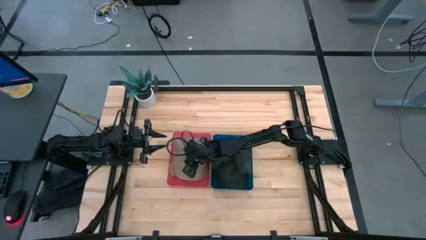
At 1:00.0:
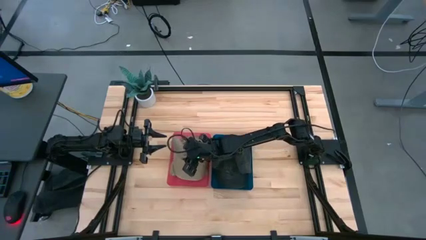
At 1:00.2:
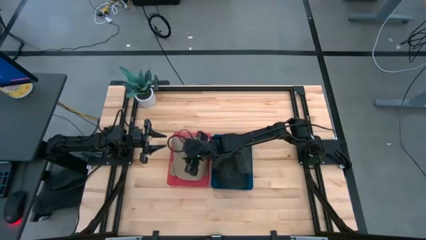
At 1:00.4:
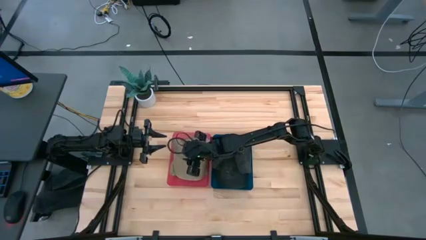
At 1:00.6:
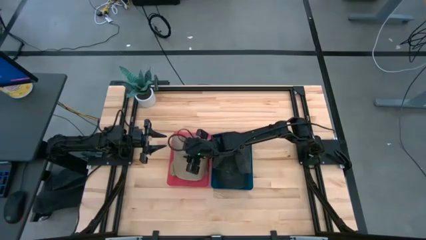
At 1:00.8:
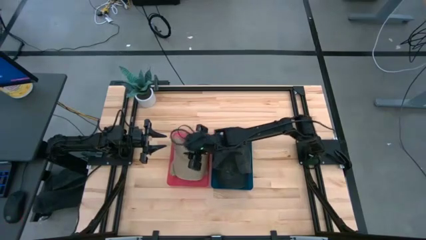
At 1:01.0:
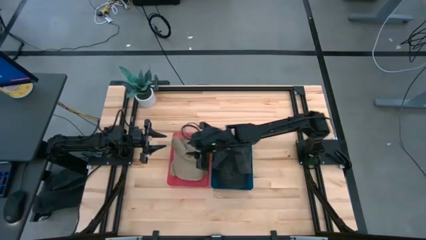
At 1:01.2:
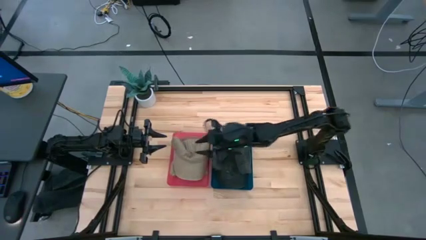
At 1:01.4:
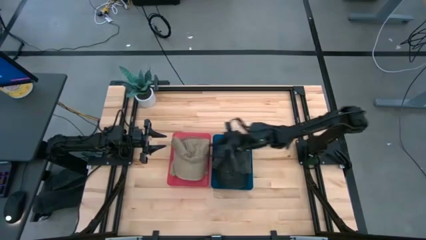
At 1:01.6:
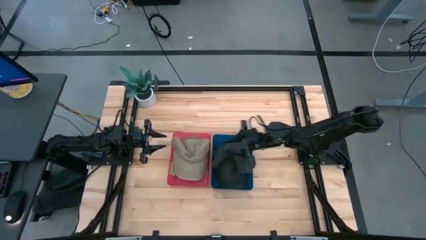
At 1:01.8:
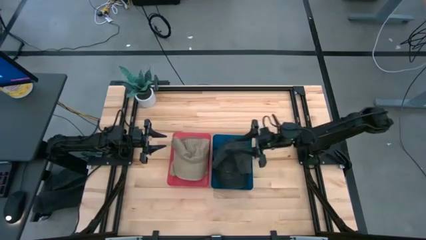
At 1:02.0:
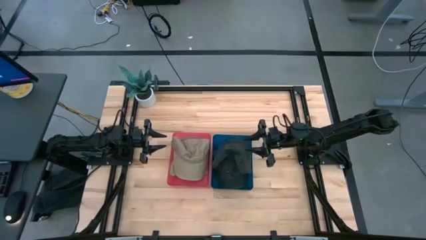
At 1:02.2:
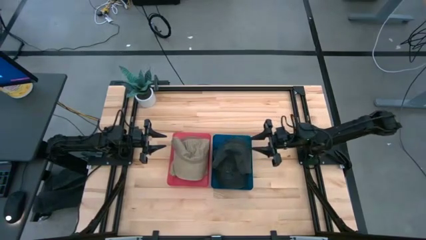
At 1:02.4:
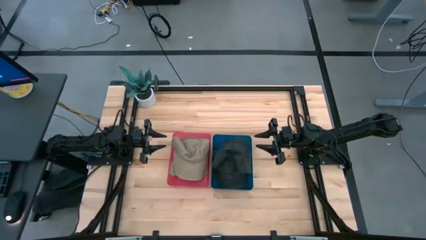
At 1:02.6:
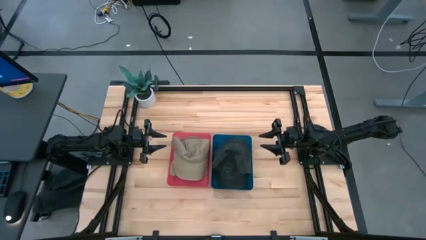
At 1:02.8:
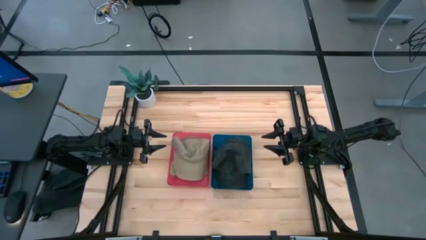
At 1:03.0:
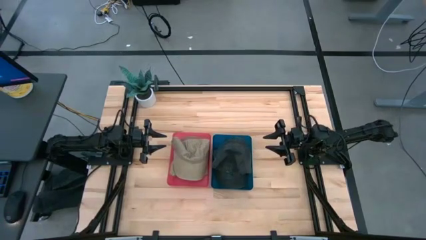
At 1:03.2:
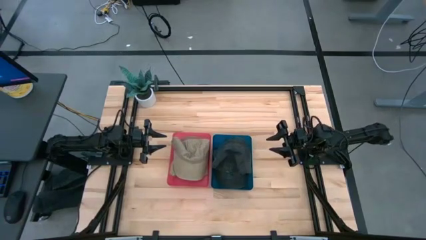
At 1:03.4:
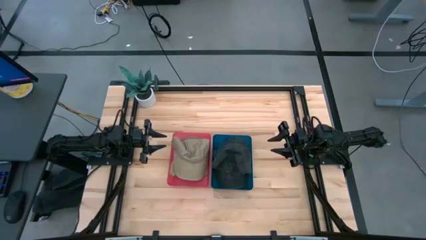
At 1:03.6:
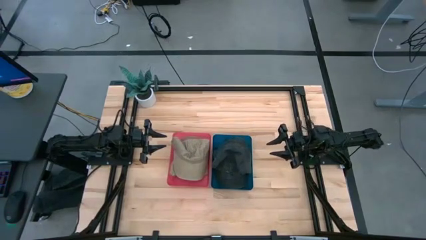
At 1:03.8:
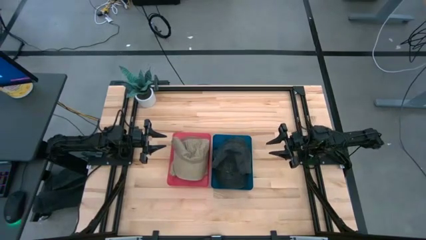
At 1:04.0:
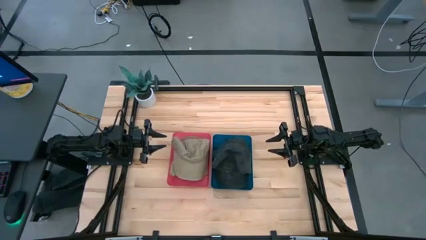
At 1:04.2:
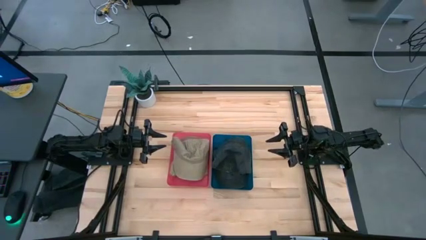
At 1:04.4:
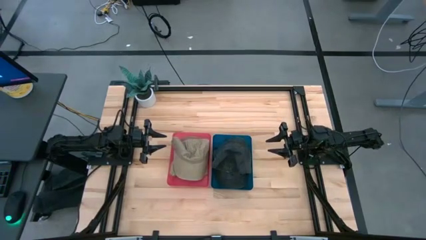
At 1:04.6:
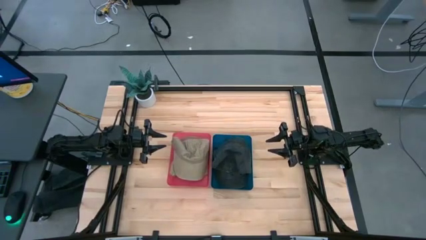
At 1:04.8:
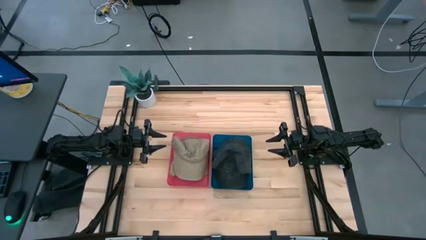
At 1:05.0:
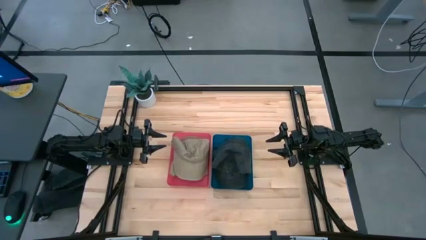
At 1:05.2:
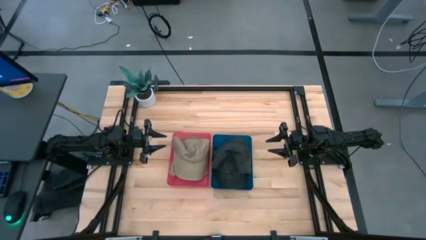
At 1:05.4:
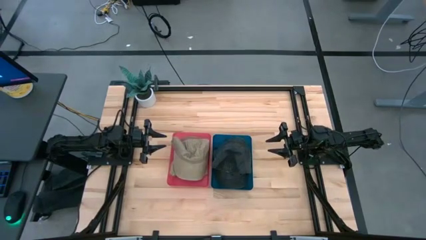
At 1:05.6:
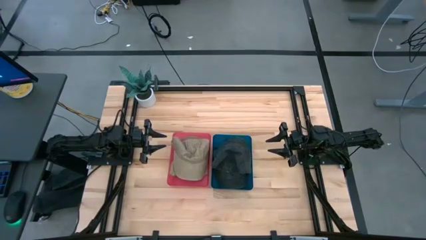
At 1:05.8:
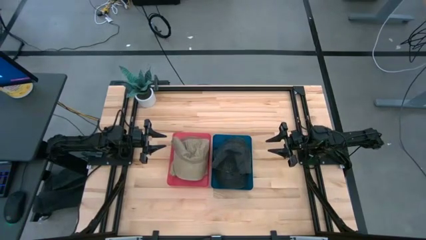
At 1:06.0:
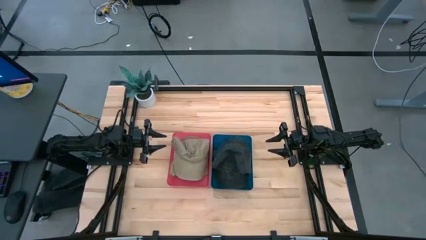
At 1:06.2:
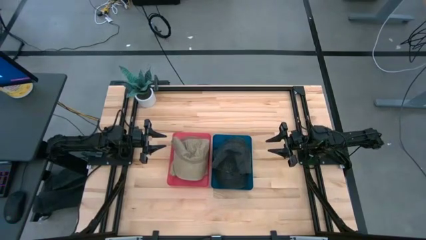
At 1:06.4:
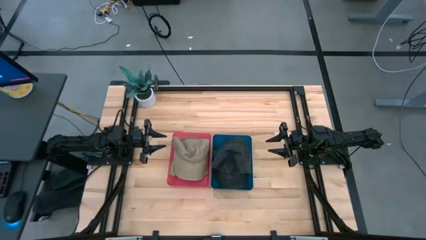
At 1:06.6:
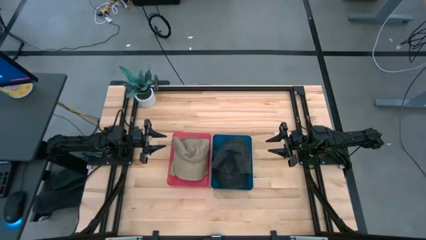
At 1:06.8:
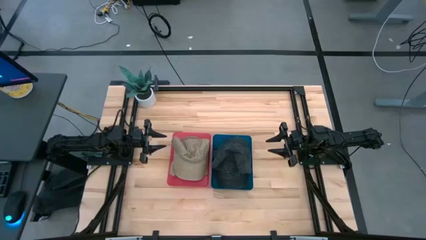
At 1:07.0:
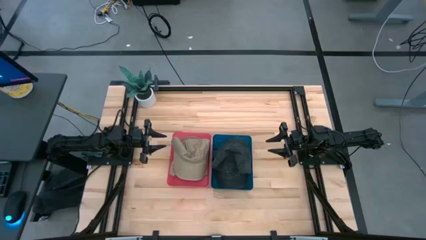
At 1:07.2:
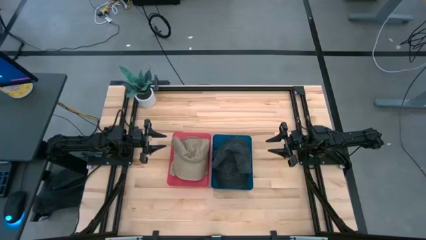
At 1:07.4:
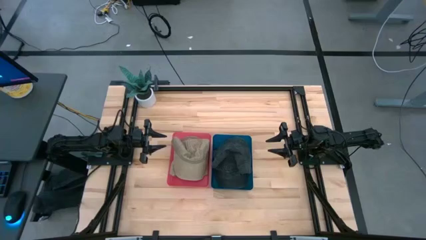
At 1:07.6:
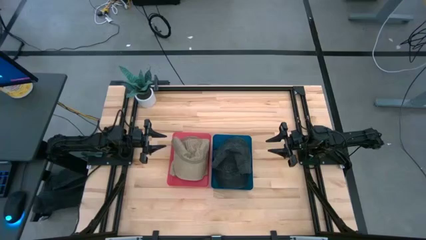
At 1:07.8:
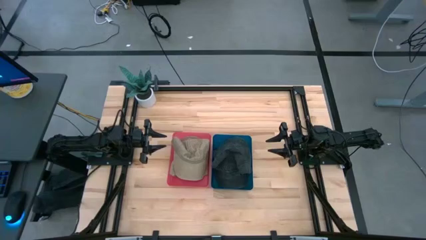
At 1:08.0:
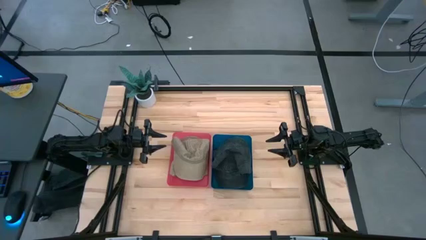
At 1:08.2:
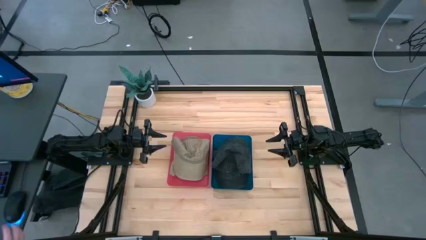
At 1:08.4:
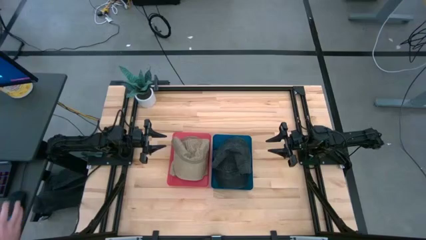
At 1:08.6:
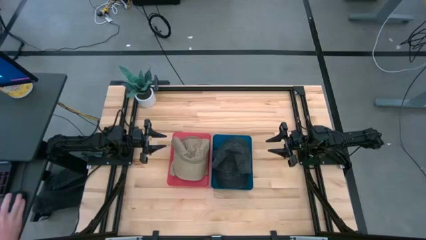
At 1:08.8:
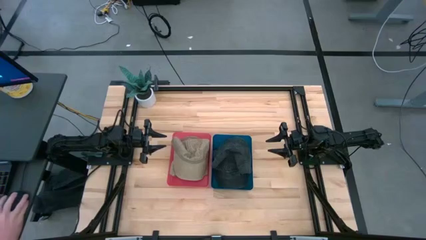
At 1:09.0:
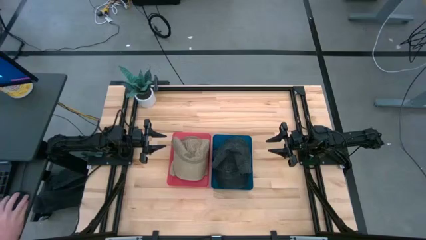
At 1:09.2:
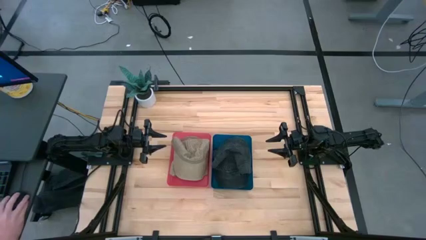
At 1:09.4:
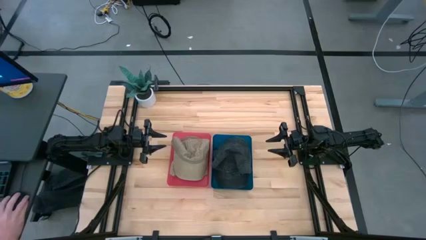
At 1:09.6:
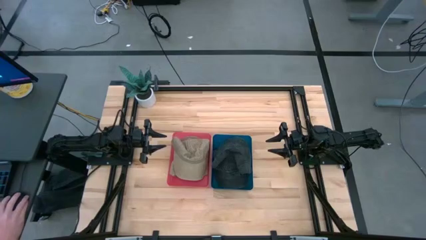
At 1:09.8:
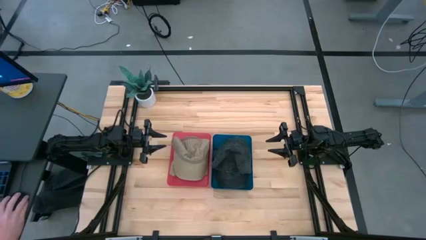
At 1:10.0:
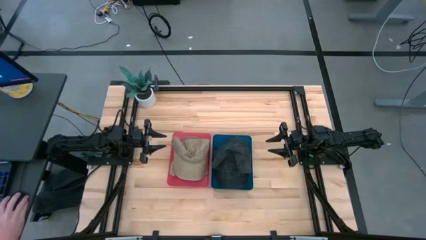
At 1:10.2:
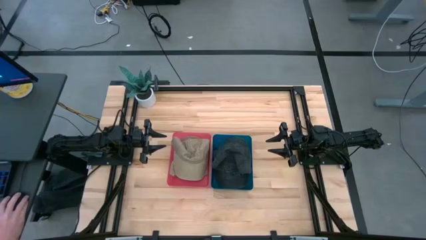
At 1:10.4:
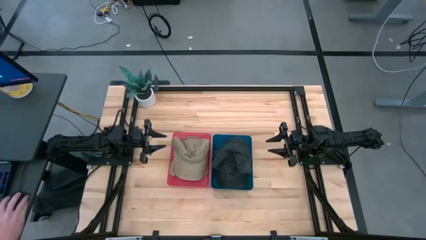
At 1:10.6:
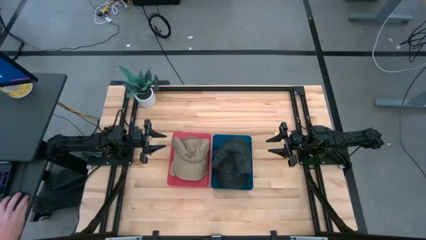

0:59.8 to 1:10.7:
Task: Pick & Place hat
Return to Home Position

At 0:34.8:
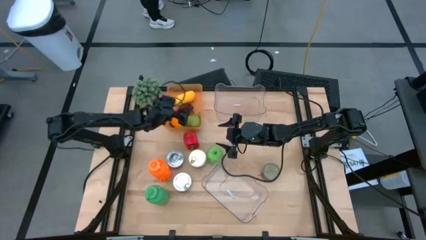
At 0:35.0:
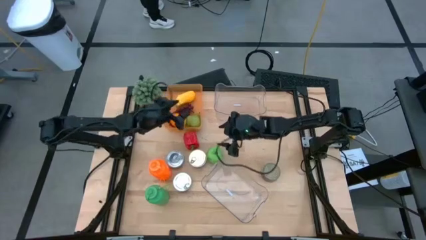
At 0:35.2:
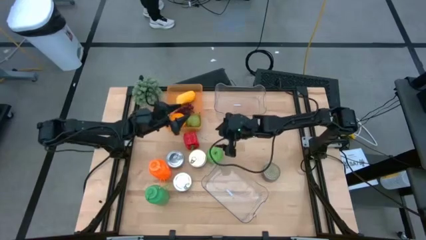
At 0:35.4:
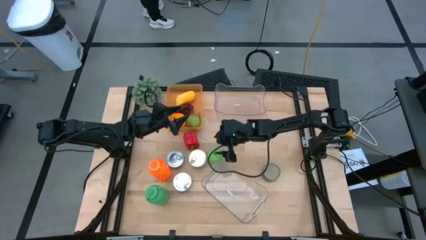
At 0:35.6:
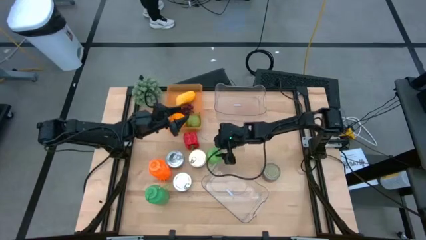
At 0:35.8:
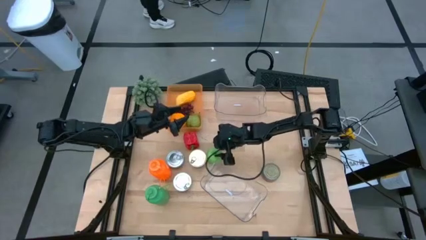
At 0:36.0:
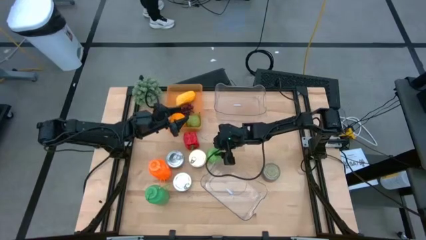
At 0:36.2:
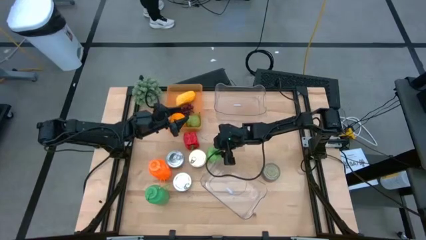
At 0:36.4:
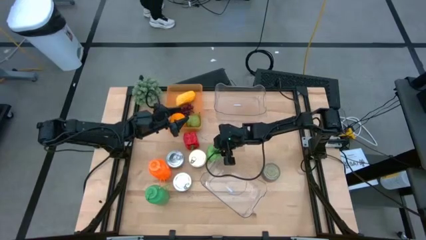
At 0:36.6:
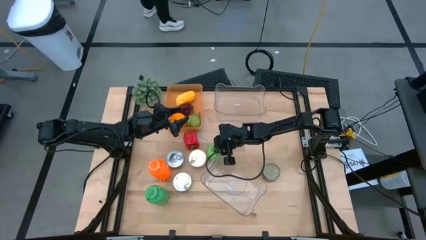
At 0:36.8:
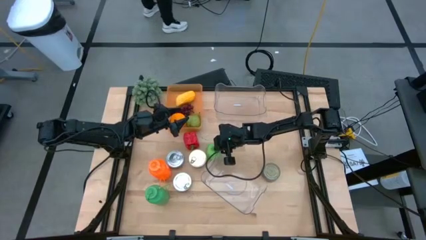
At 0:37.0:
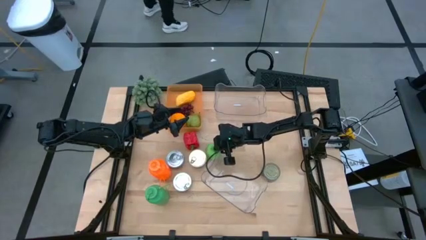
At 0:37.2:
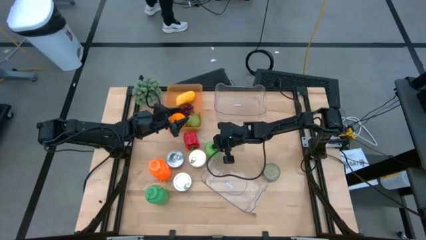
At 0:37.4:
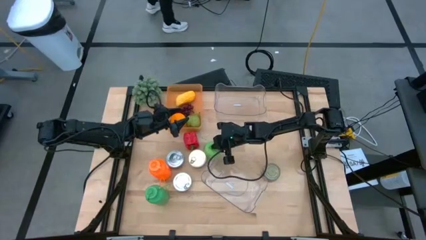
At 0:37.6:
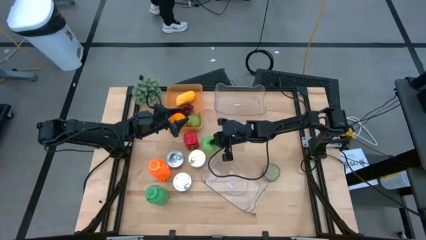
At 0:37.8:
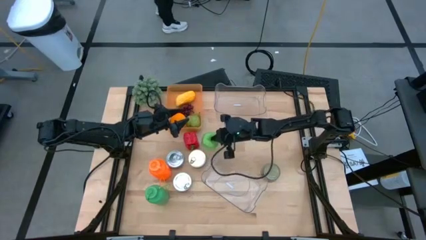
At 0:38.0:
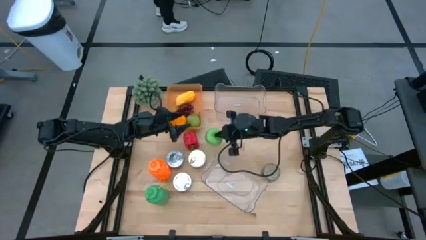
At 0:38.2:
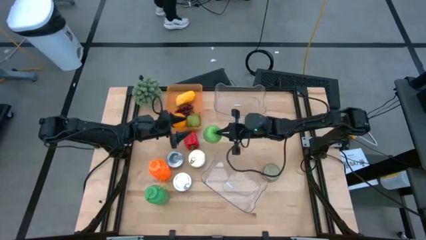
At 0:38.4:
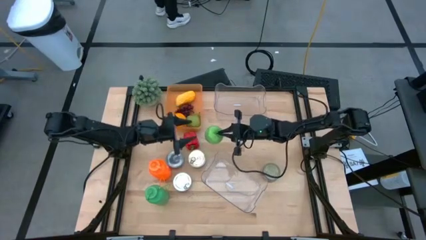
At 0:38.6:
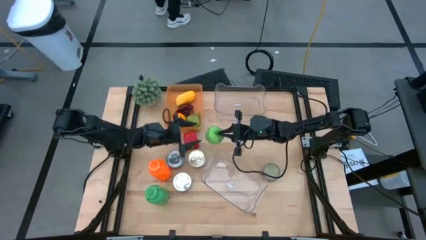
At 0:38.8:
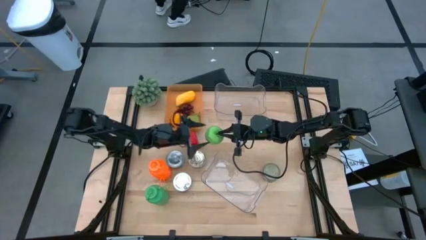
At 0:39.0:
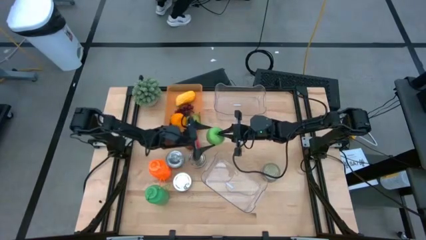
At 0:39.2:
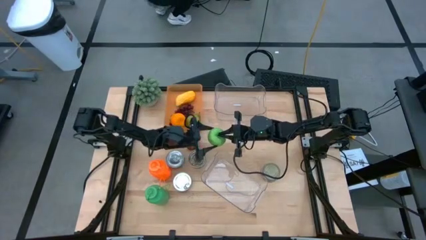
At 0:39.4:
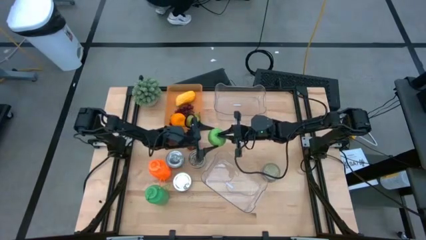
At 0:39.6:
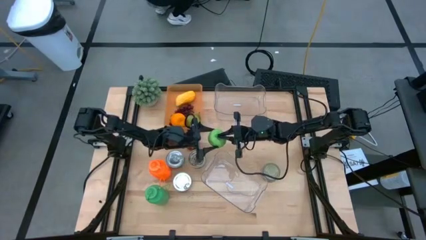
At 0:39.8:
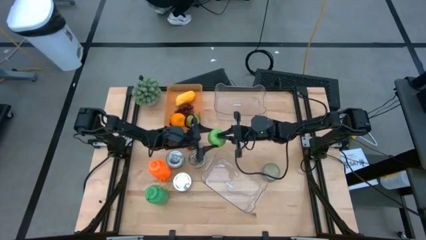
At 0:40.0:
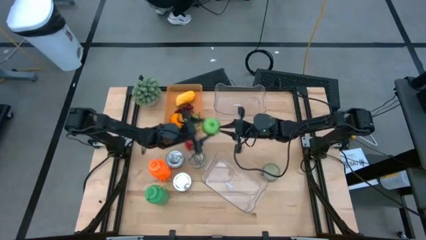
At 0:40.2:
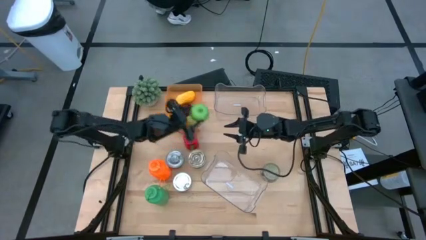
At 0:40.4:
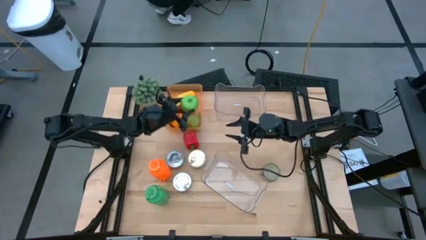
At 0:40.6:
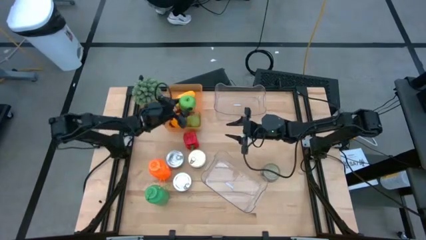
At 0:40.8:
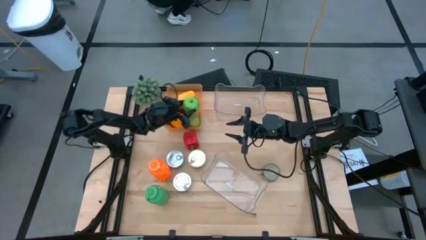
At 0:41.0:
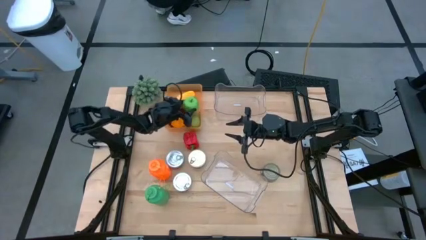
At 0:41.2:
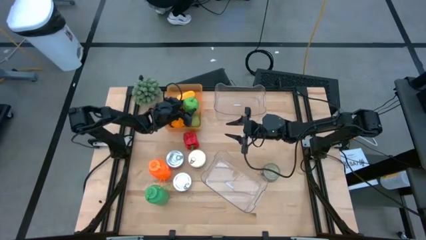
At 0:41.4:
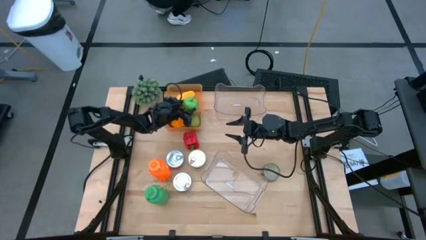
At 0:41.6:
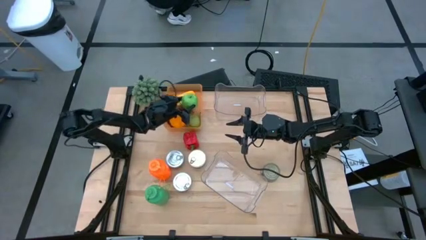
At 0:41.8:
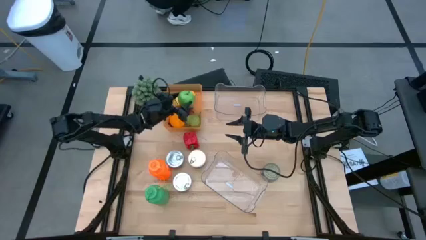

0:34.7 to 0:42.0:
Task: Pick & Place Food Item
Put the apple into the orange bin
